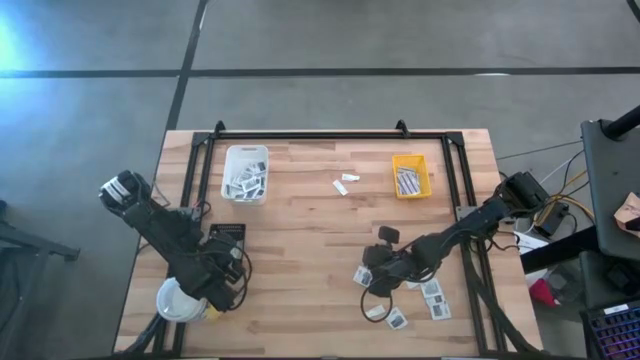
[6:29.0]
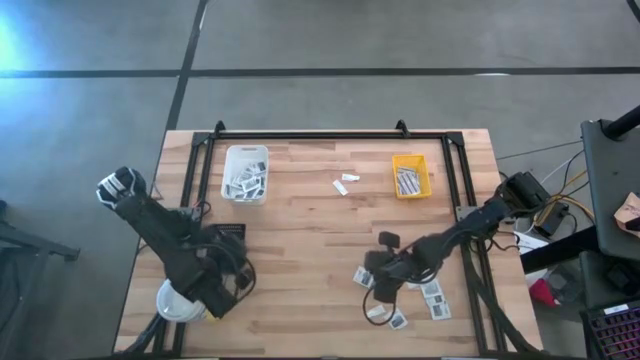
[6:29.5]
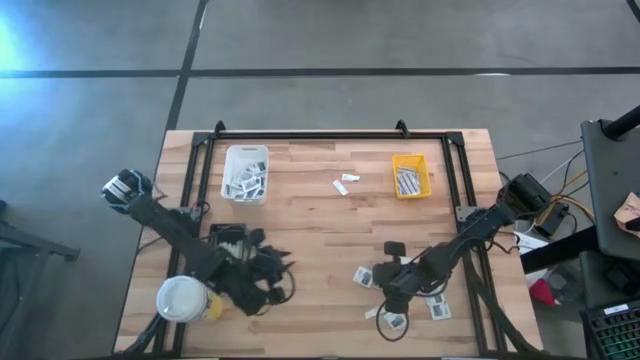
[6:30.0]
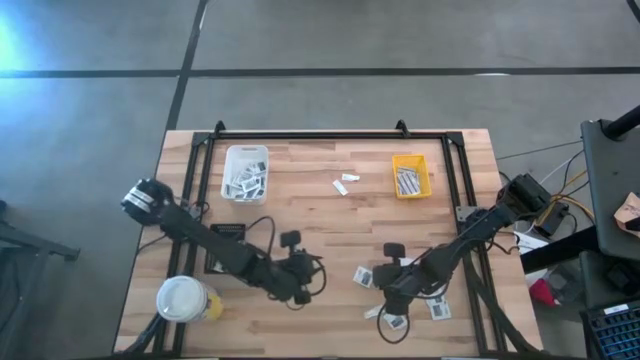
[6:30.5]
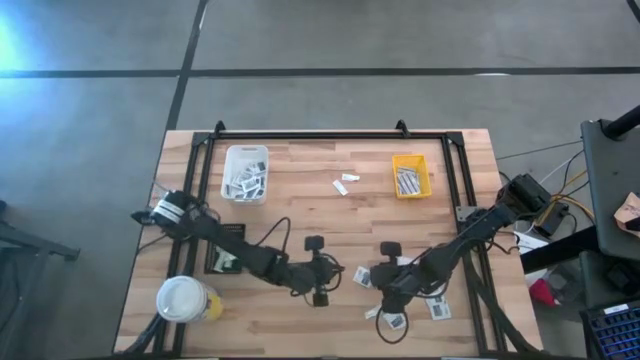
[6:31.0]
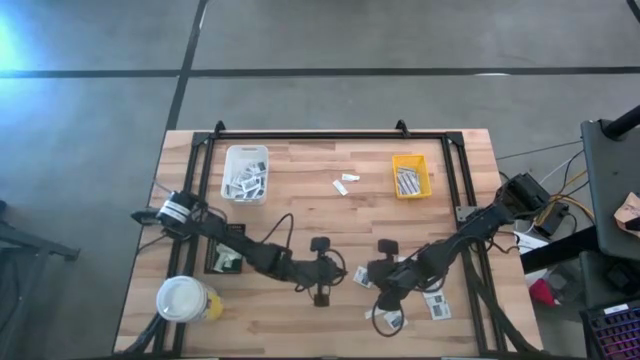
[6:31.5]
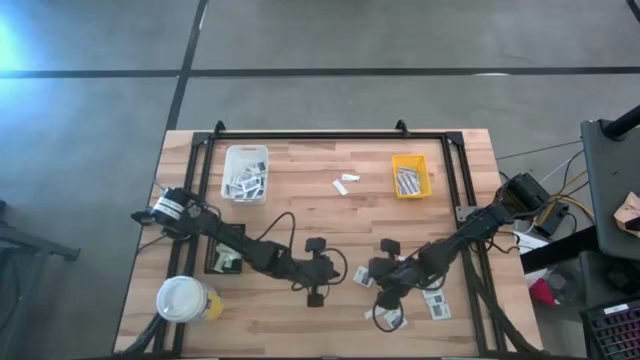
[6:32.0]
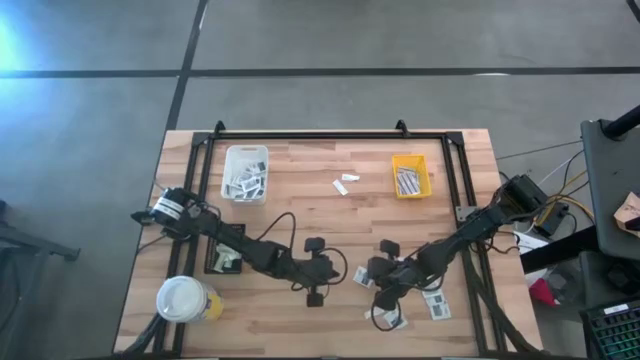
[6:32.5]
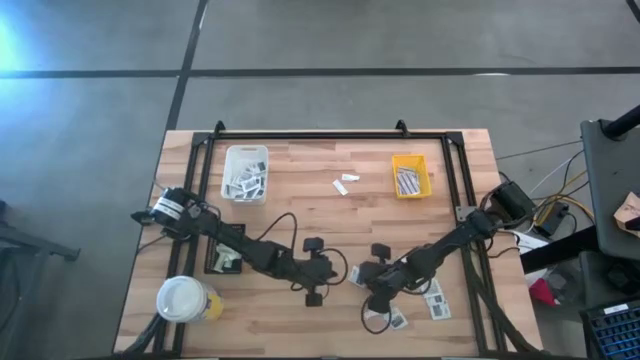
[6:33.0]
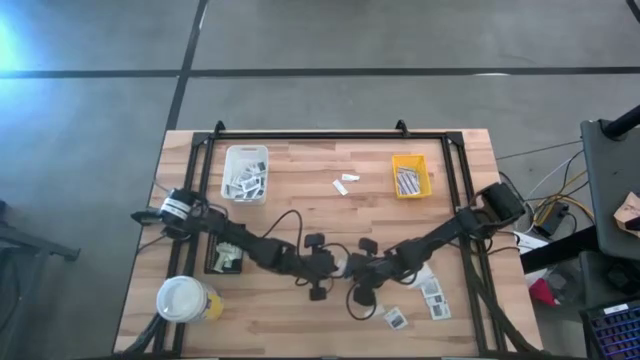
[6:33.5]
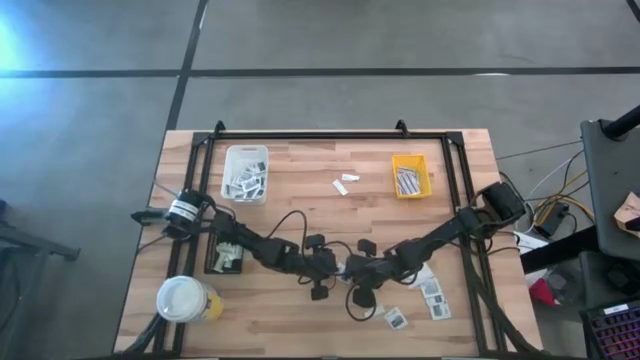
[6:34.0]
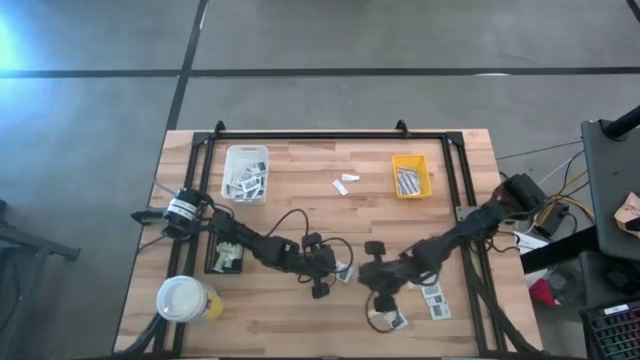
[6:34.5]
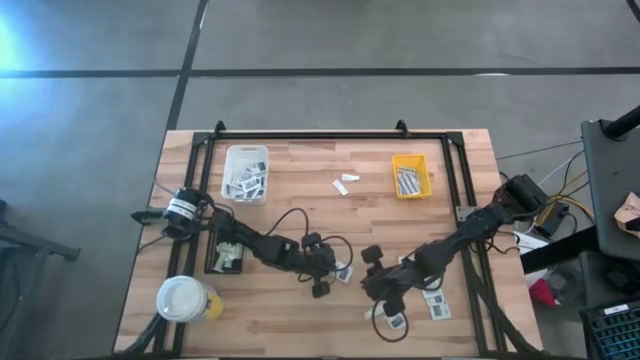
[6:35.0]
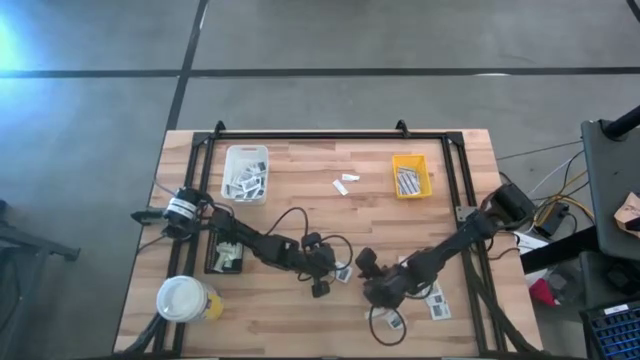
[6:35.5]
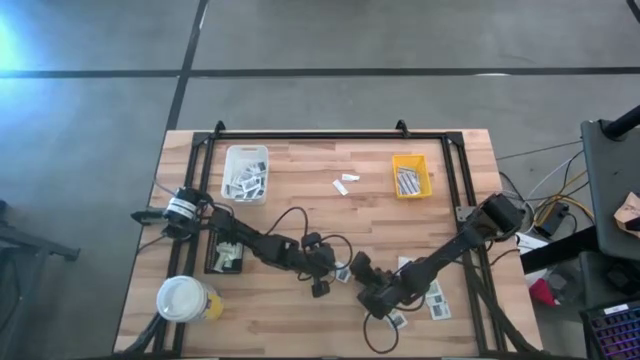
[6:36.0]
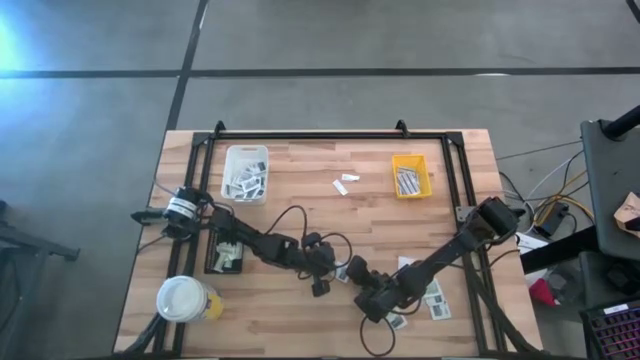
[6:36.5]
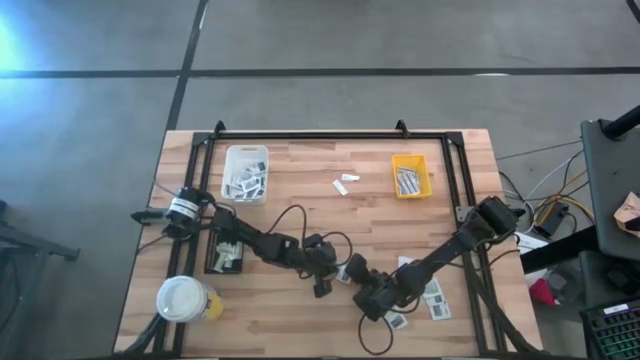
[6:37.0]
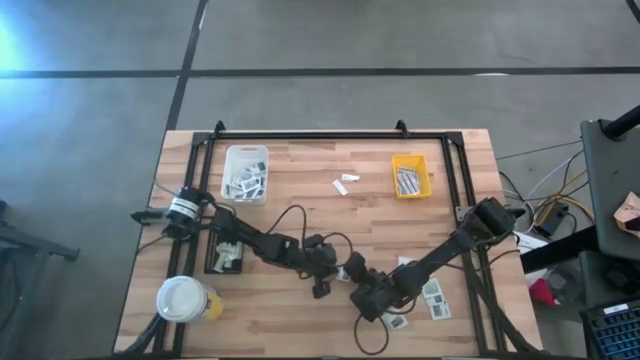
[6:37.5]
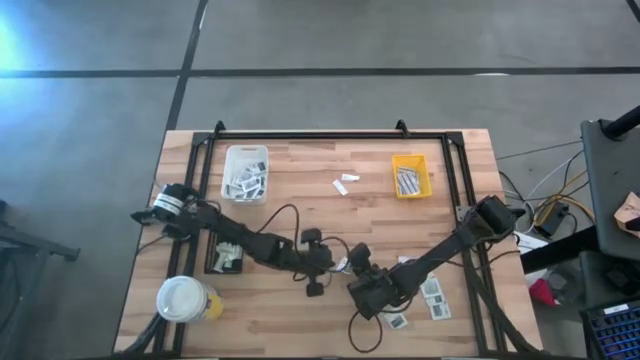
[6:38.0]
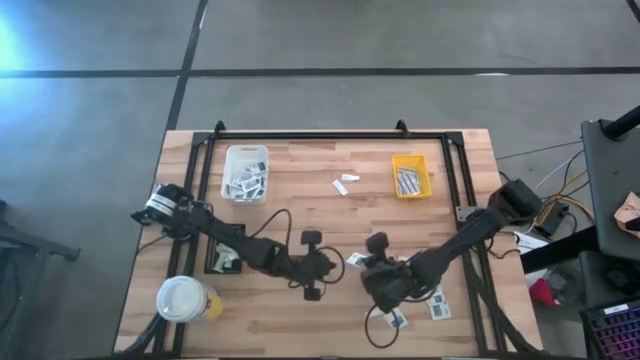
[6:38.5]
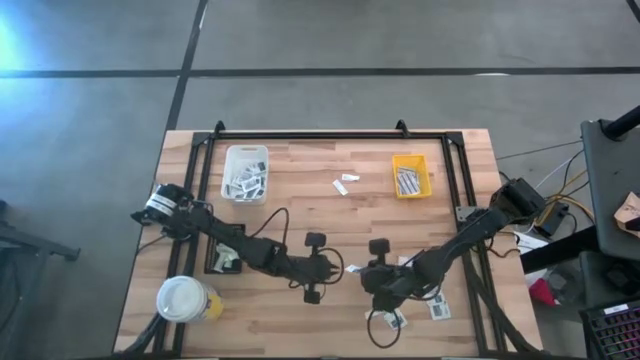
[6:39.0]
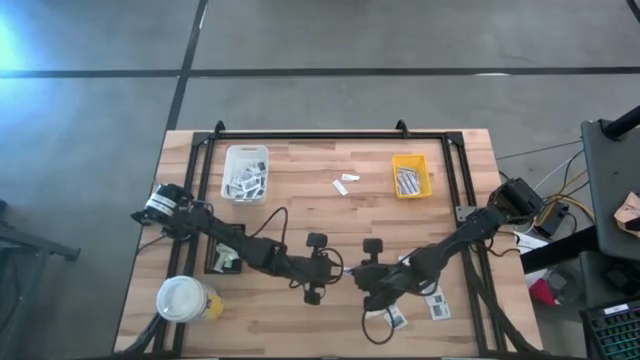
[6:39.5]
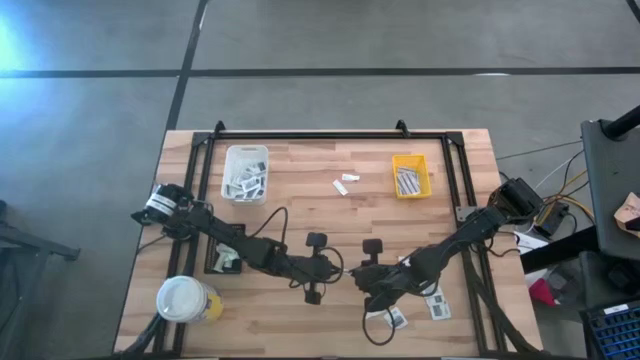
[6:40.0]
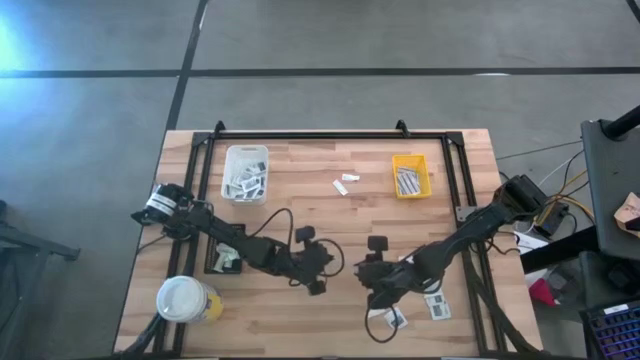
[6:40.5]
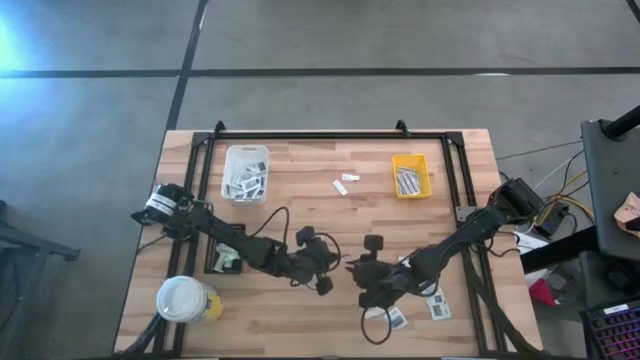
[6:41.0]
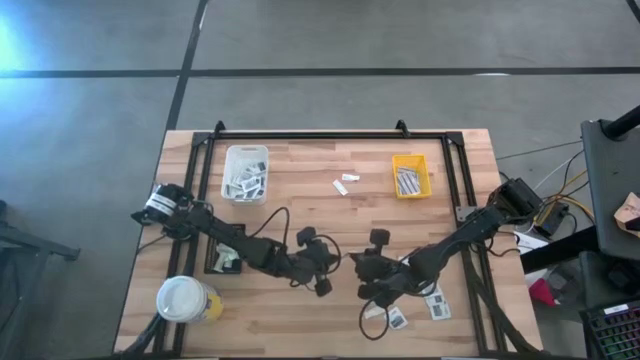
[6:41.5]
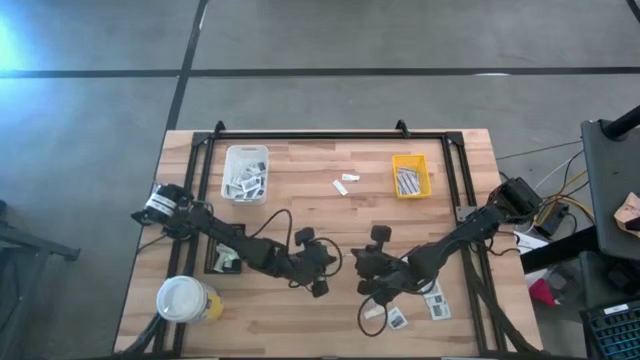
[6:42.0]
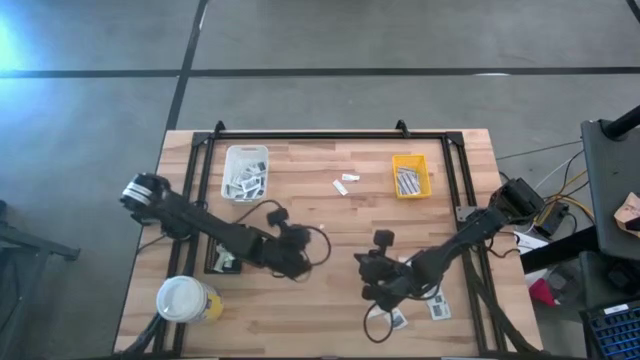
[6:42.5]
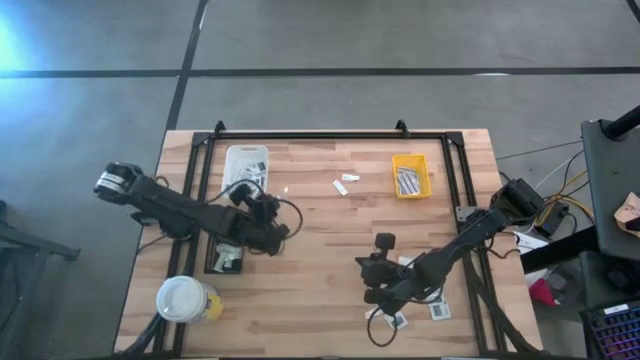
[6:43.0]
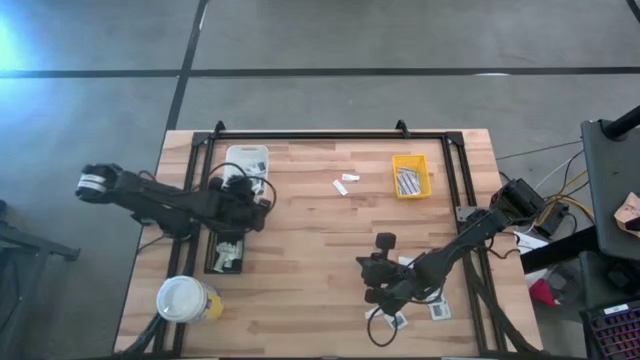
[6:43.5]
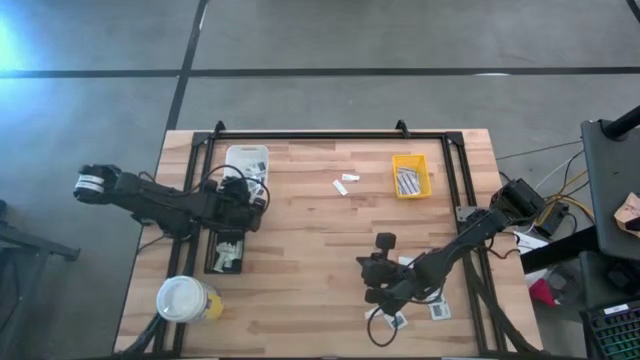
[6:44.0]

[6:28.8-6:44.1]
Task: Pick & Place First Aid Supplies
Put the gray towelette pack into the white bin

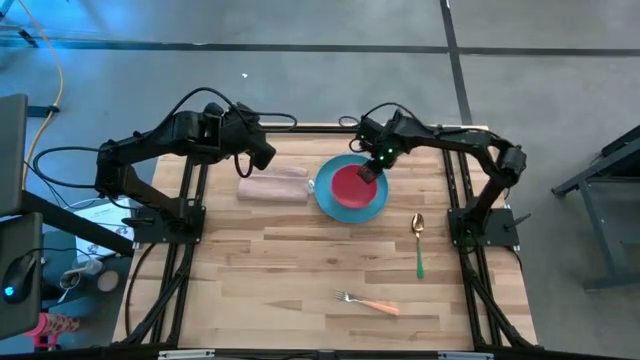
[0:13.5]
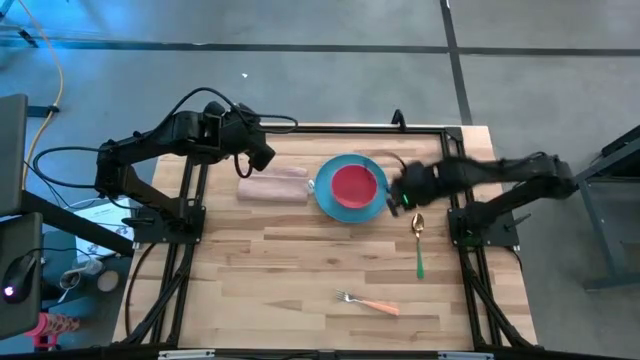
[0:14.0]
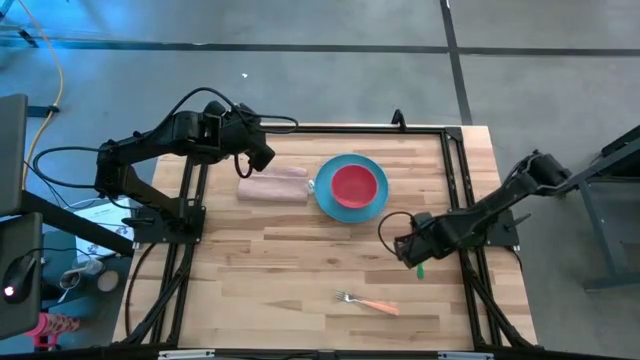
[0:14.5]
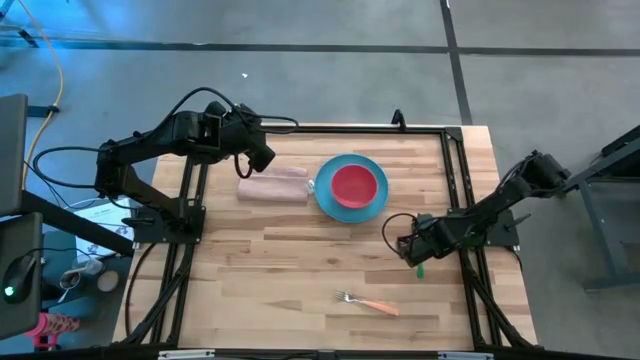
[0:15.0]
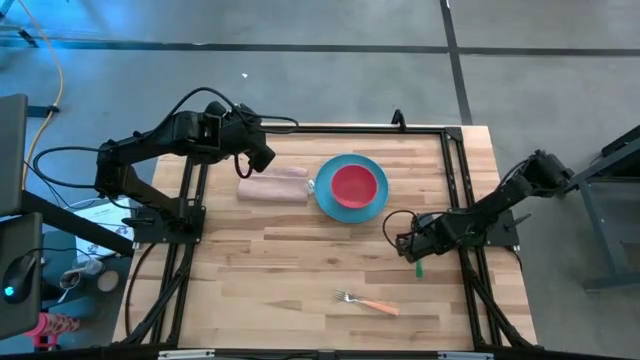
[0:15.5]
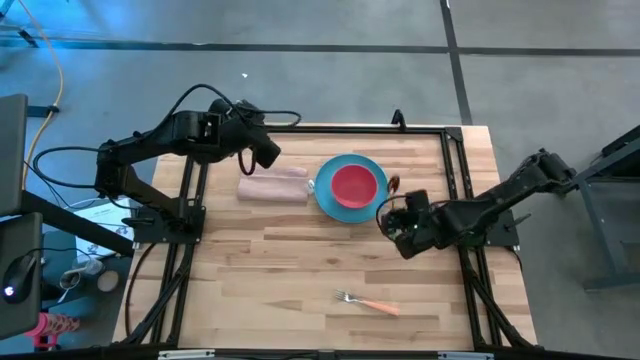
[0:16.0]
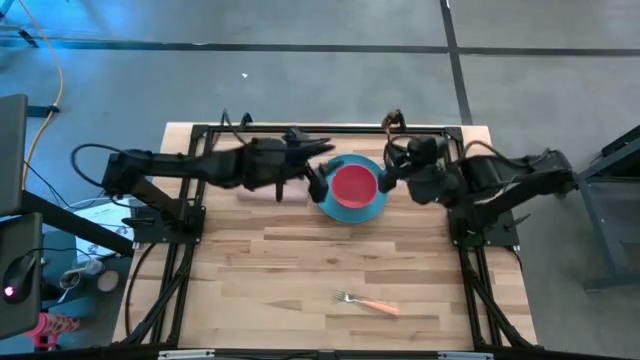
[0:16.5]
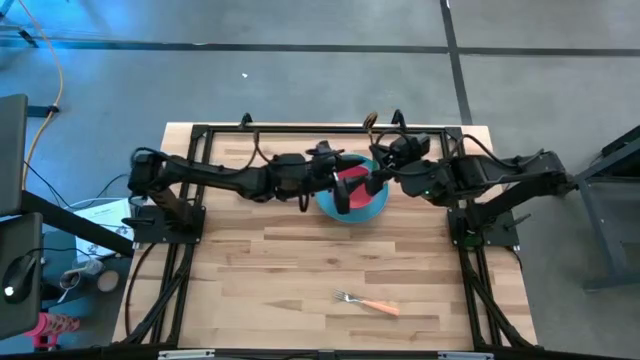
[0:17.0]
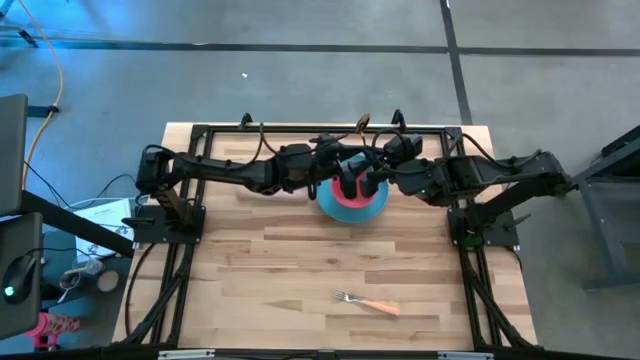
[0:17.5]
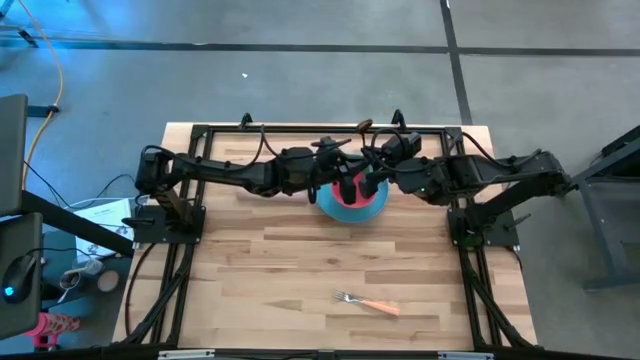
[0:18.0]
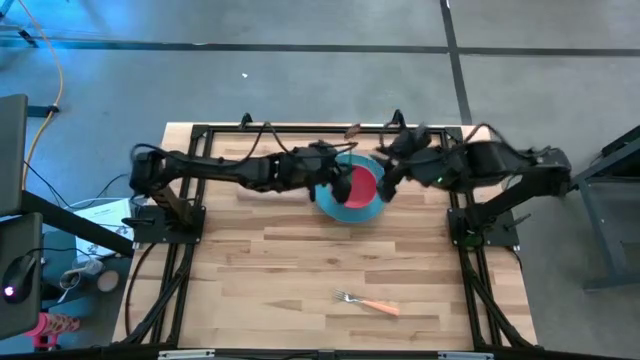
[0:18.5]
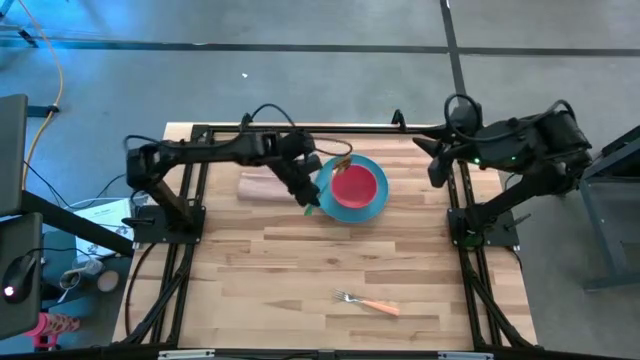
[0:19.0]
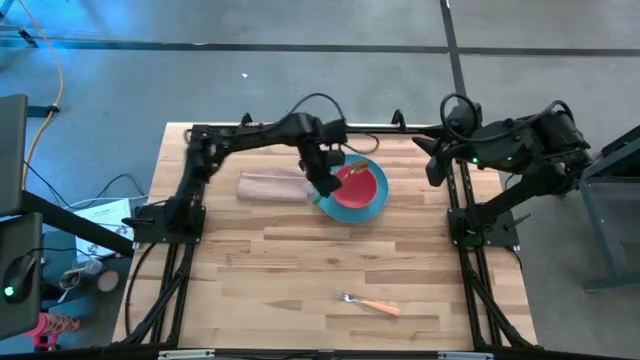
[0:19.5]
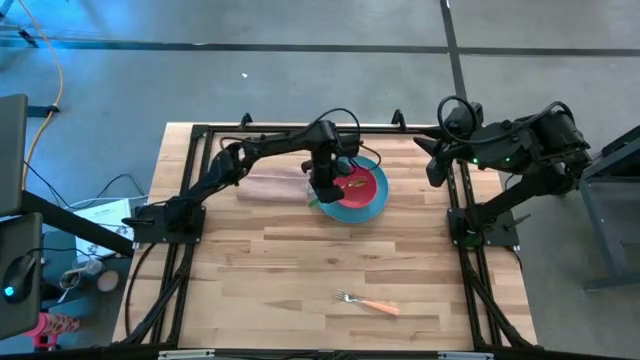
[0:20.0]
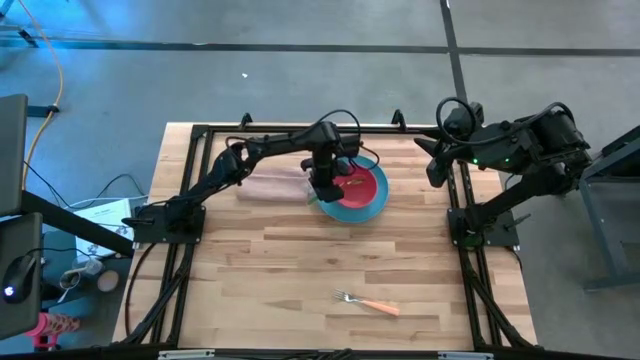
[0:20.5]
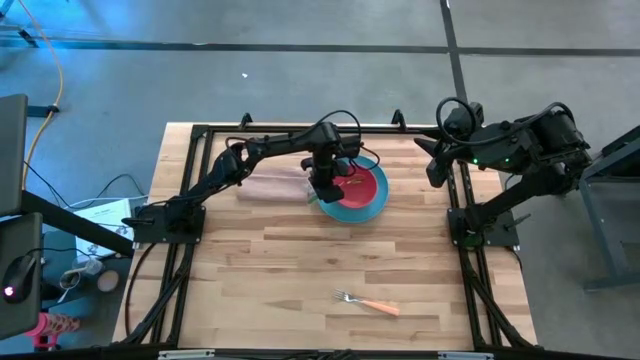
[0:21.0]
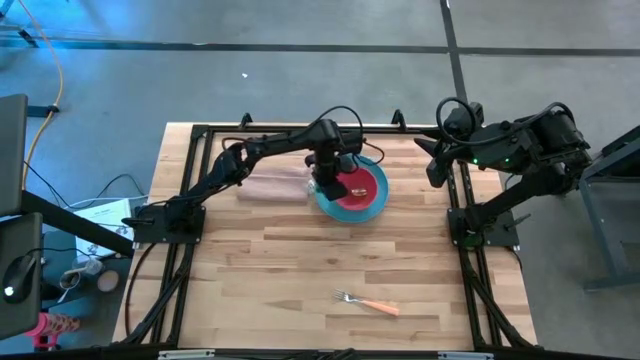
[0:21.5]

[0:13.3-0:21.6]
Task: Set table place
Put the green spoon on the orange bowl
